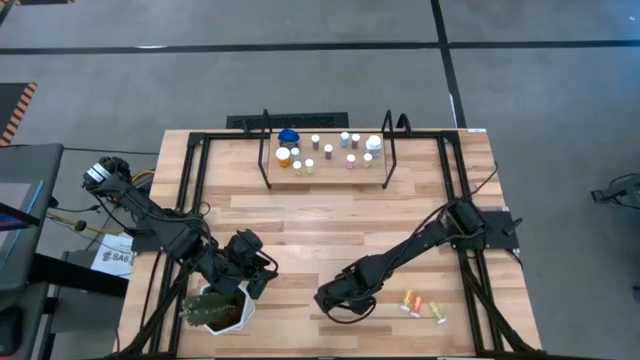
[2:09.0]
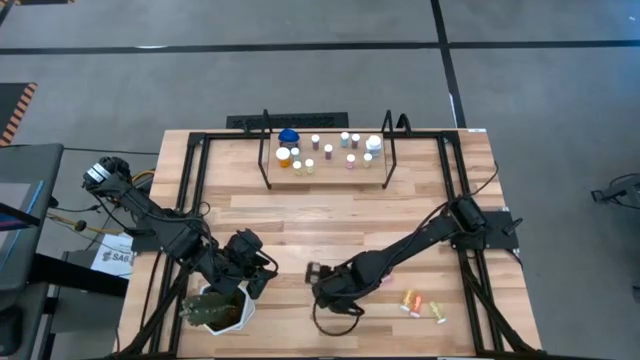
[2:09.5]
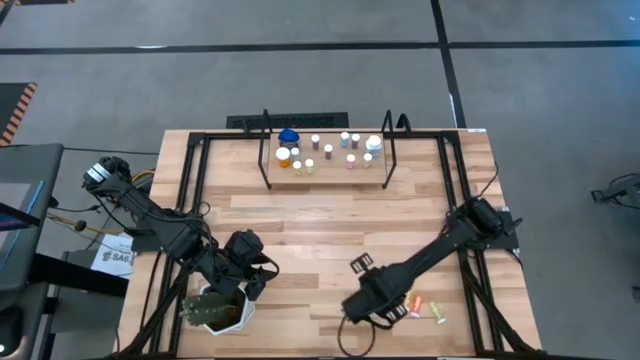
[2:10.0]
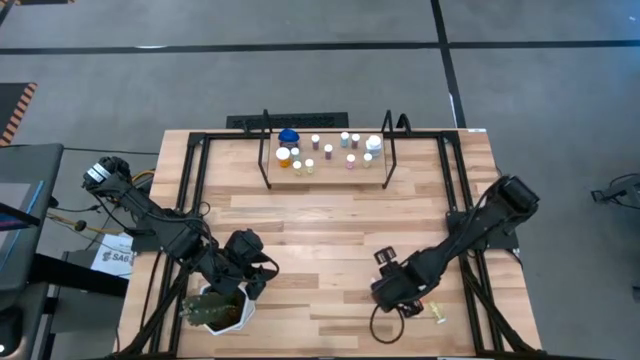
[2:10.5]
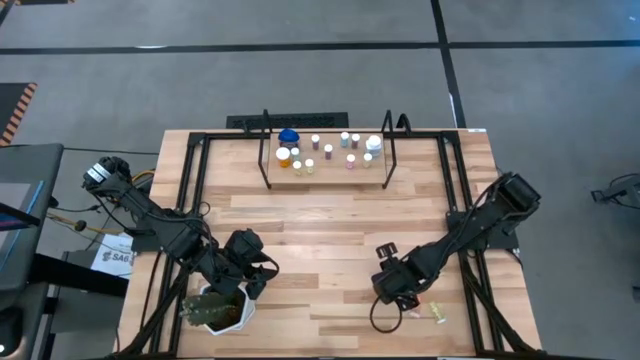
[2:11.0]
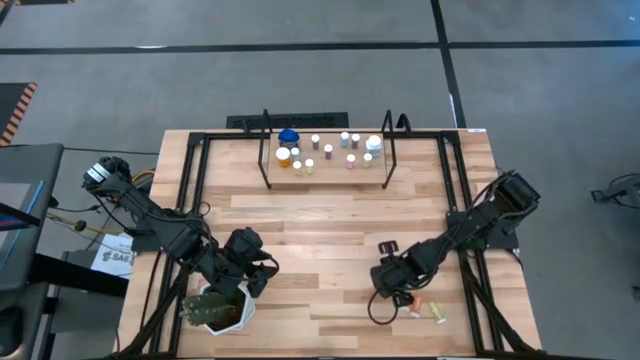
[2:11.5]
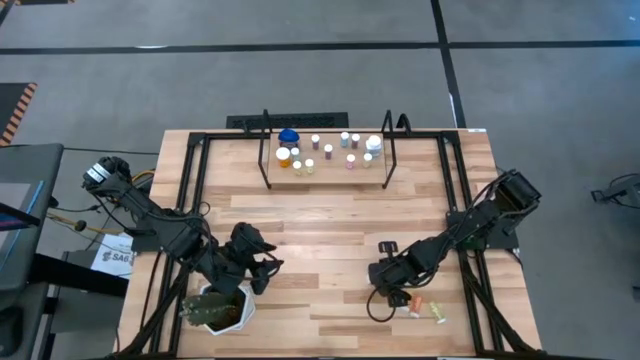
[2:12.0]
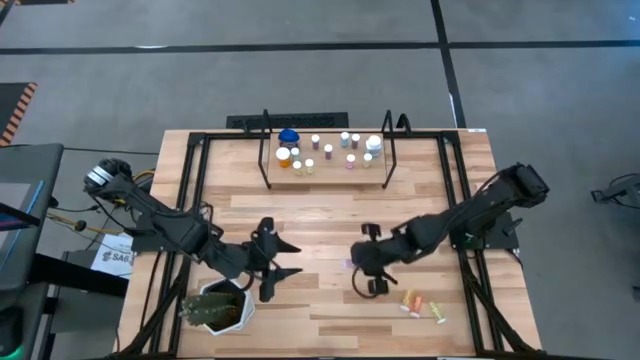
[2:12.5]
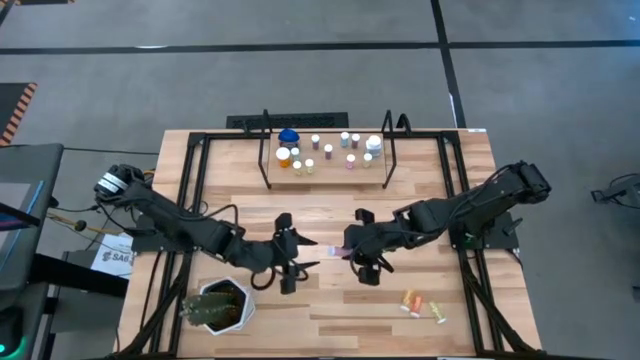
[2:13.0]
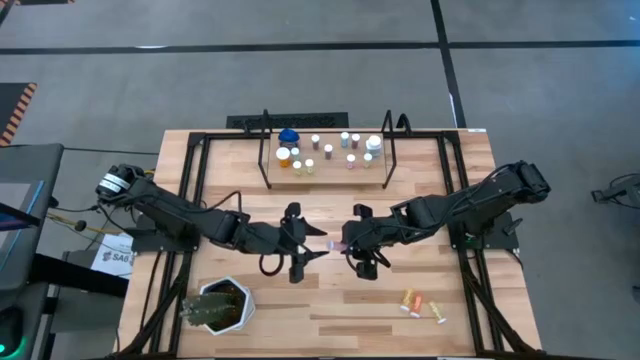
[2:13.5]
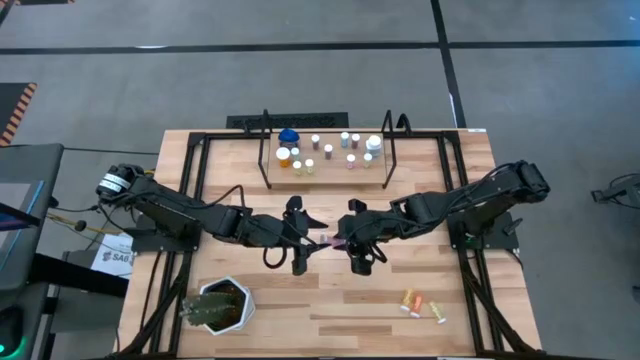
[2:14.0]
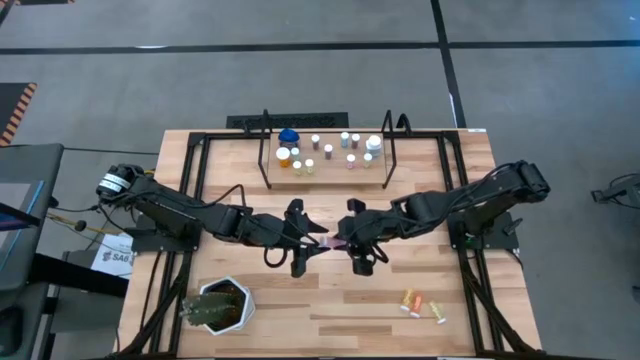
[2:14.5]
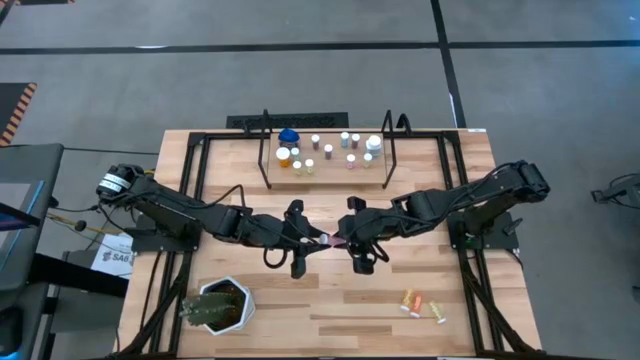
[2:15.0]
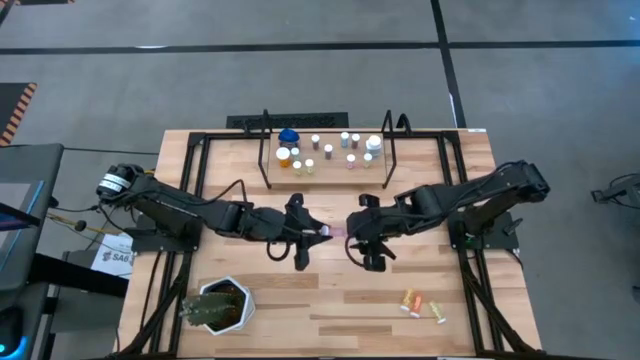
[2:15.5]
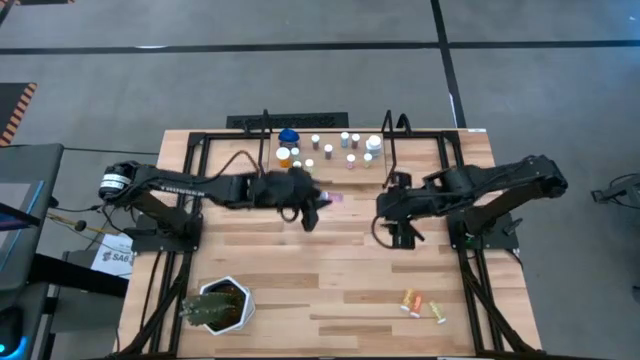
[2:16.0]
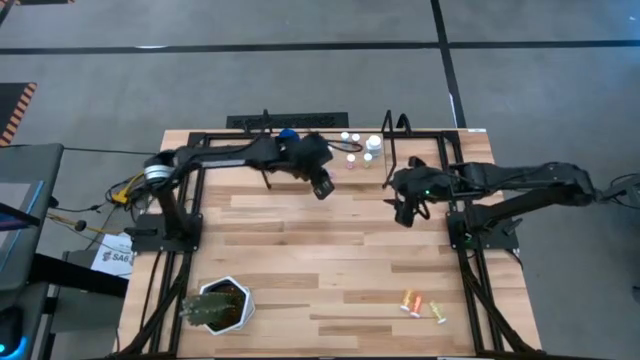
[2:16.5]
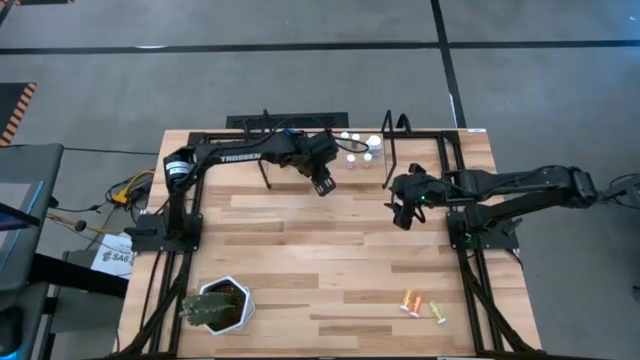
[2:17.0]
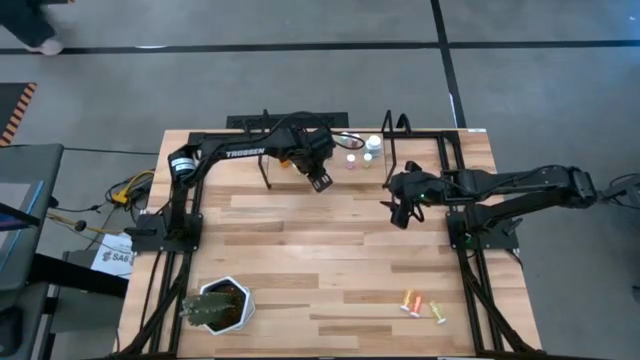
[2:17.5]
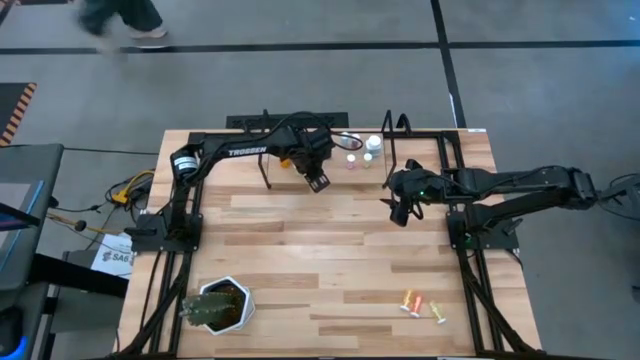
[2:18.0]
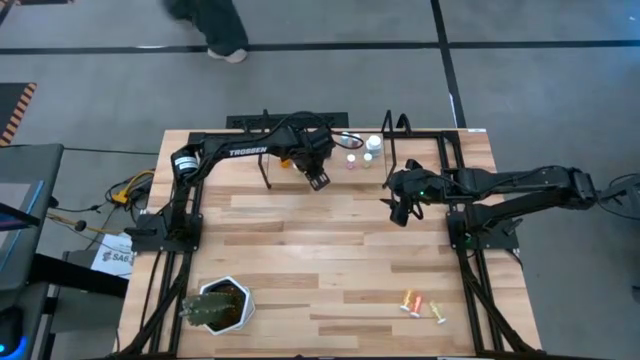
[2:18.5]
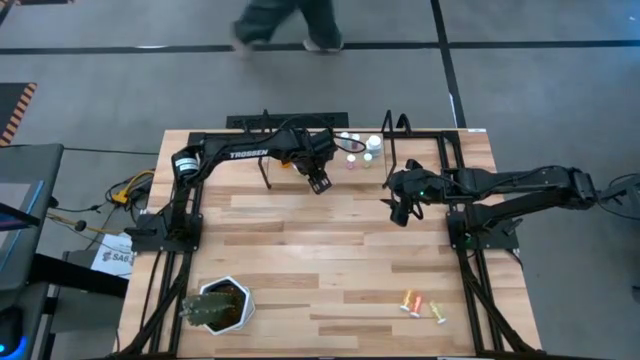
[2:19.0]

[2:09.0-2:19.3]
Task: Pick and place medicine bottles onto shelf by color
Put the pink pill bottle on the shelf

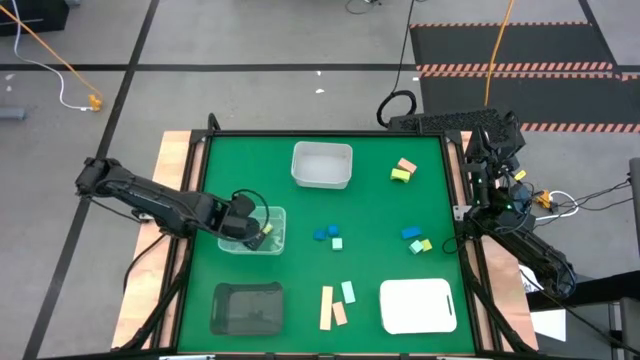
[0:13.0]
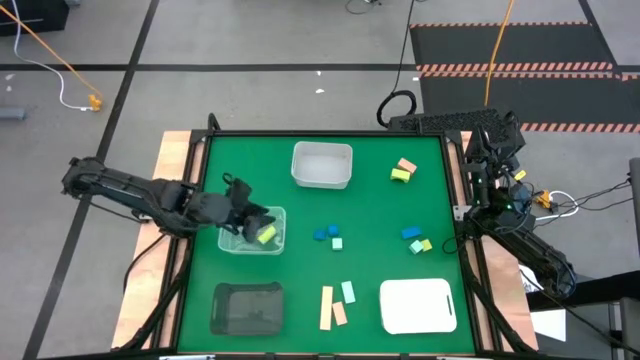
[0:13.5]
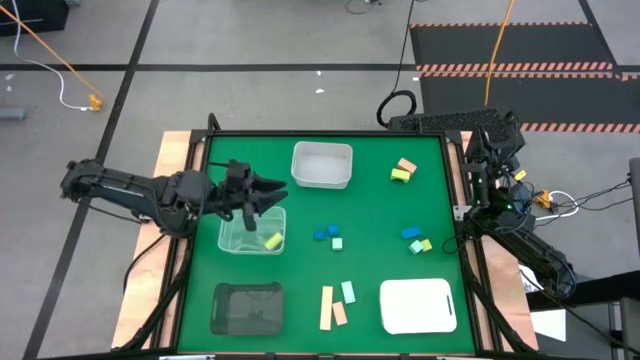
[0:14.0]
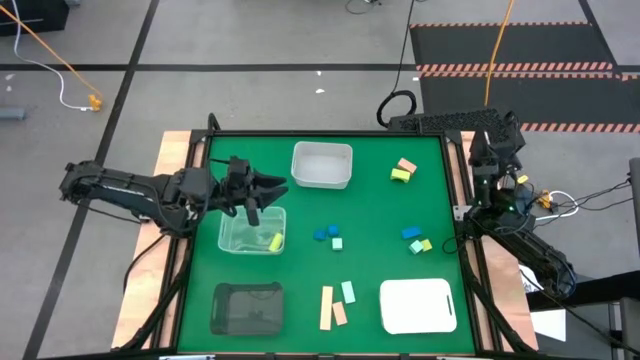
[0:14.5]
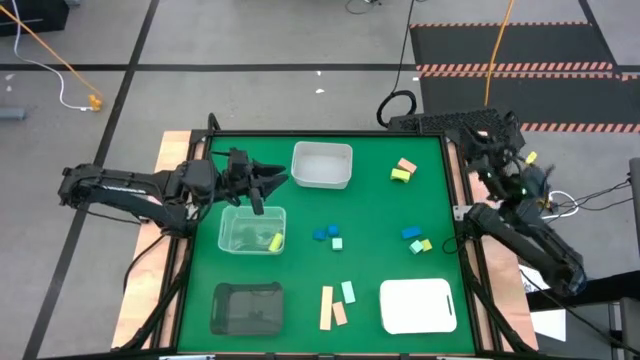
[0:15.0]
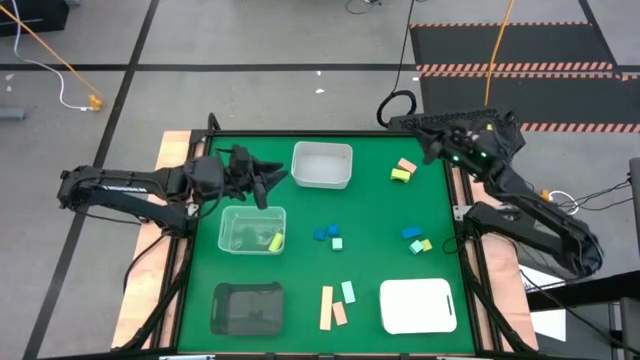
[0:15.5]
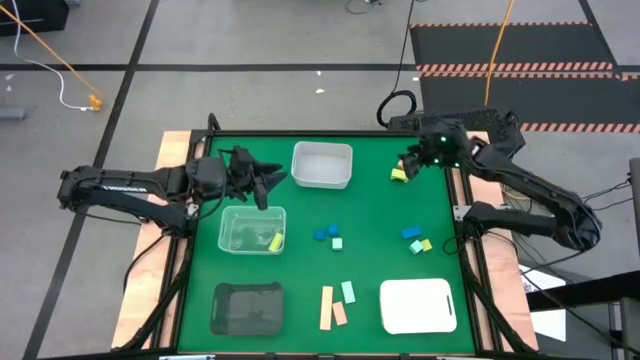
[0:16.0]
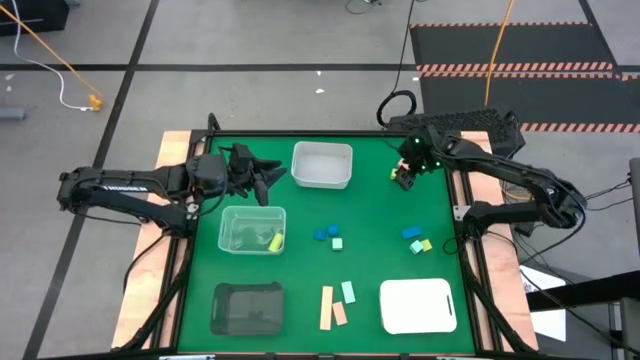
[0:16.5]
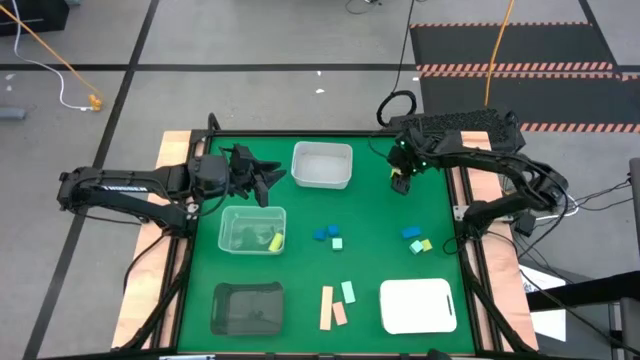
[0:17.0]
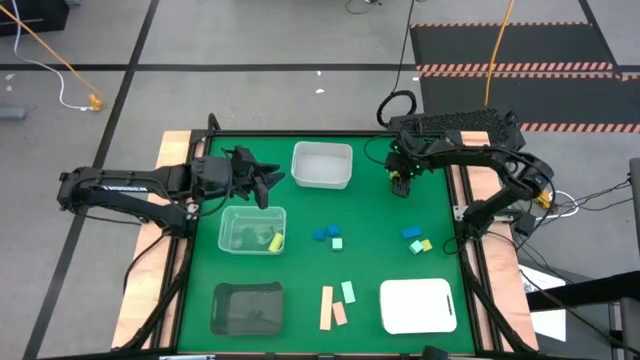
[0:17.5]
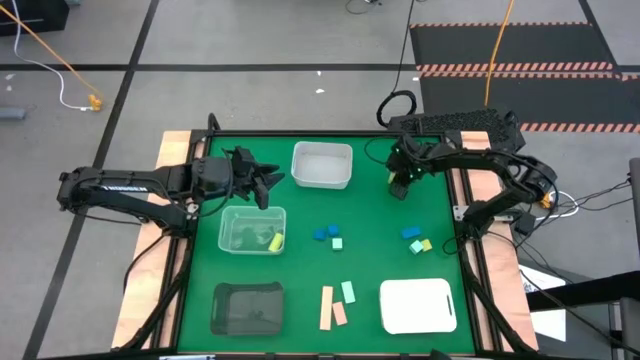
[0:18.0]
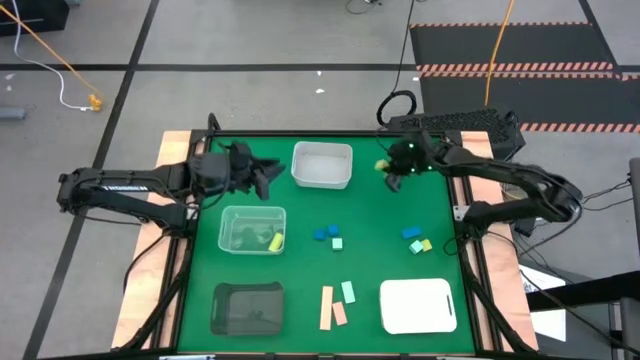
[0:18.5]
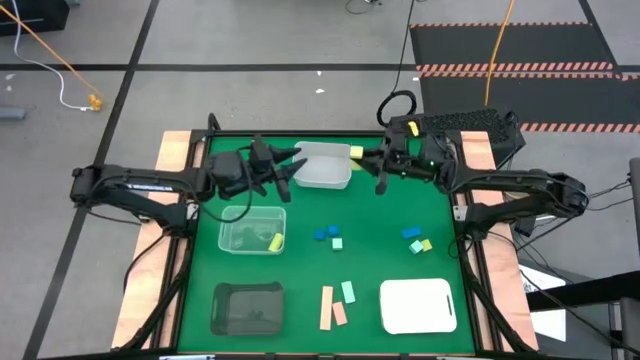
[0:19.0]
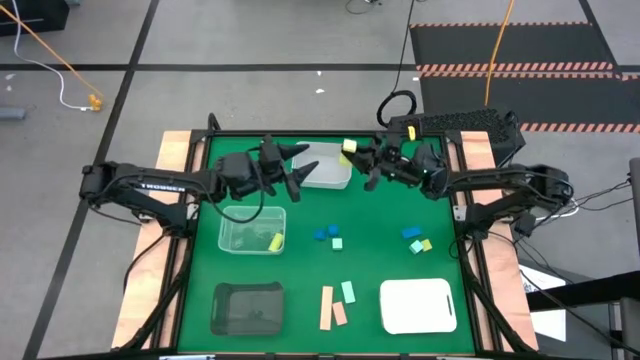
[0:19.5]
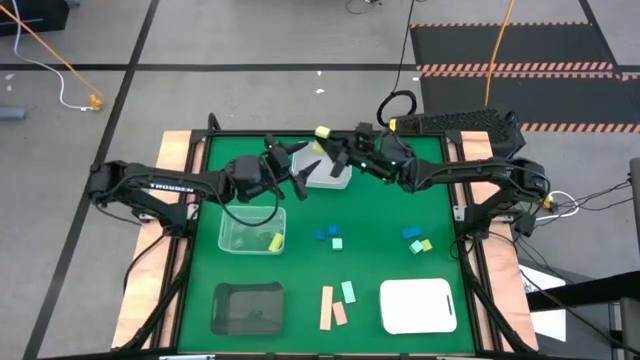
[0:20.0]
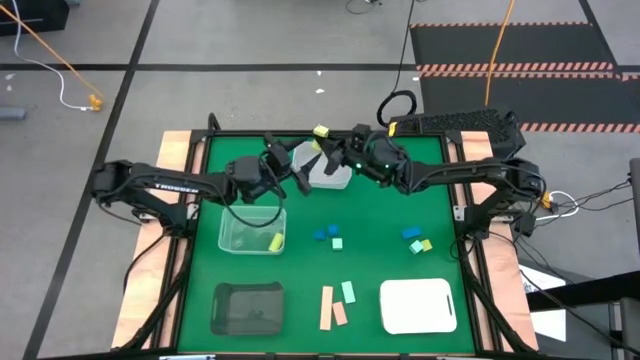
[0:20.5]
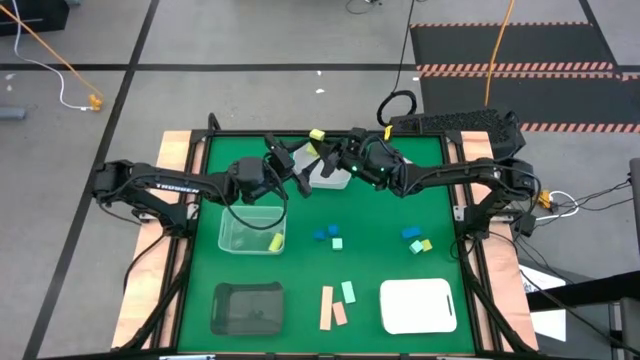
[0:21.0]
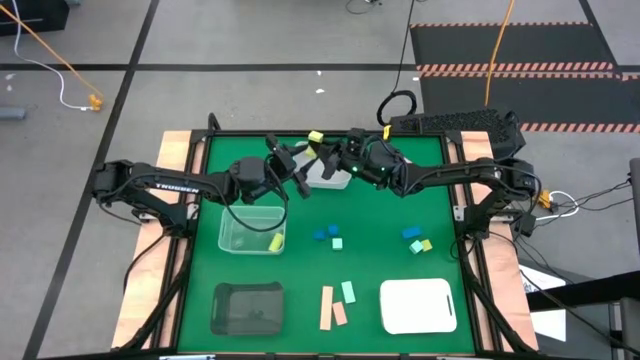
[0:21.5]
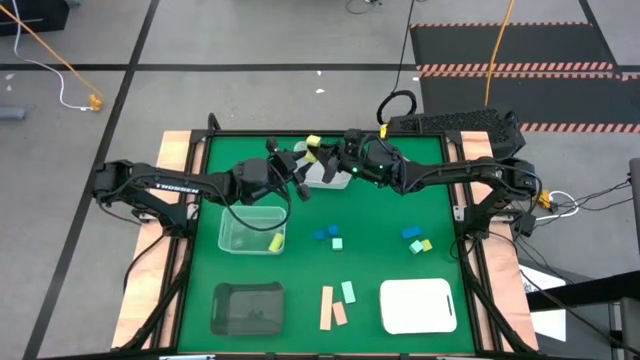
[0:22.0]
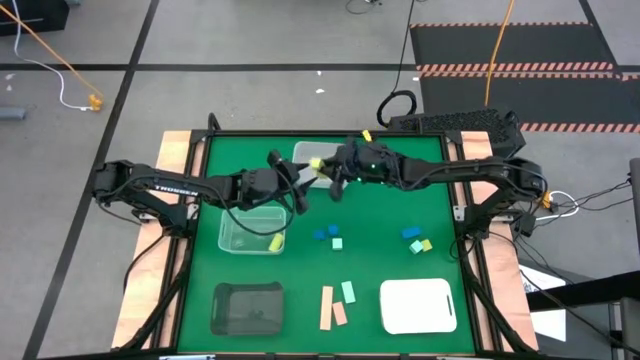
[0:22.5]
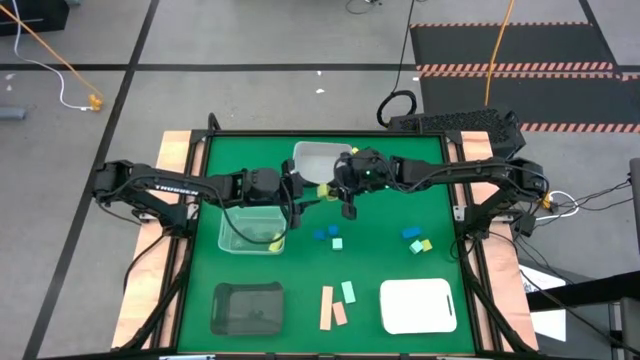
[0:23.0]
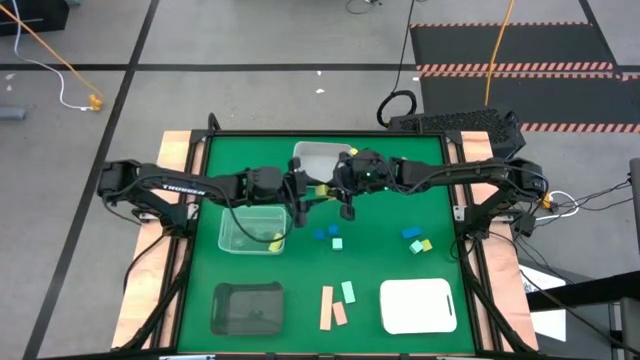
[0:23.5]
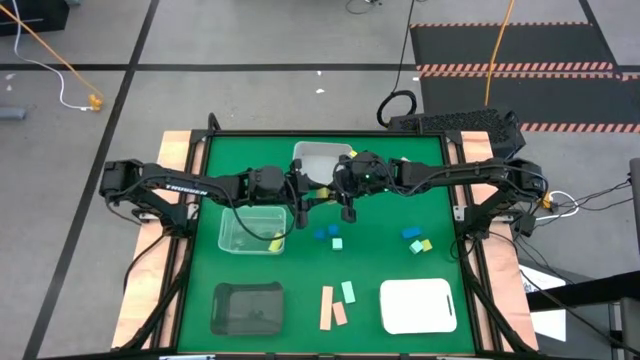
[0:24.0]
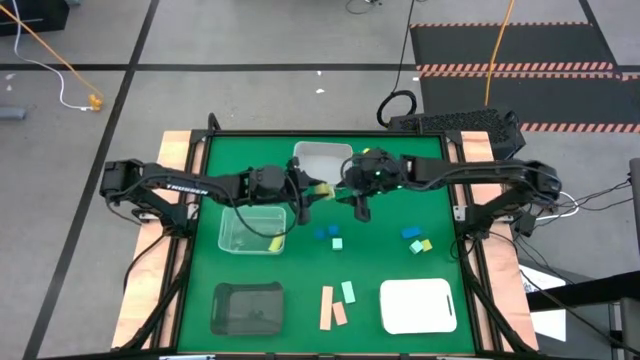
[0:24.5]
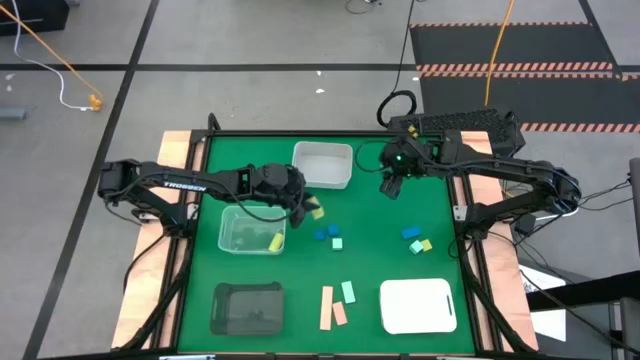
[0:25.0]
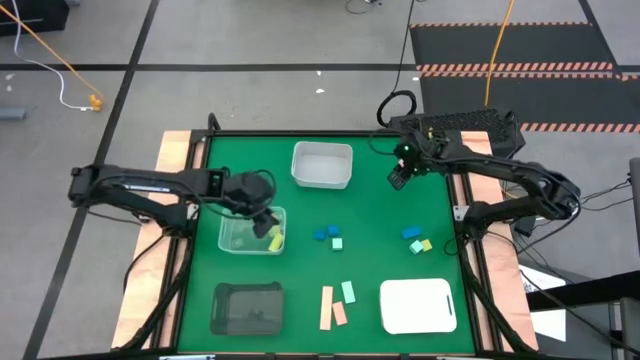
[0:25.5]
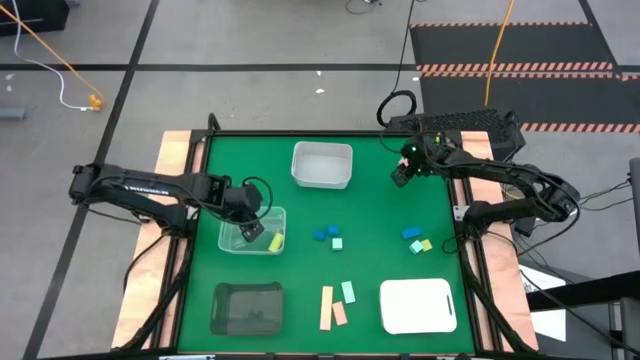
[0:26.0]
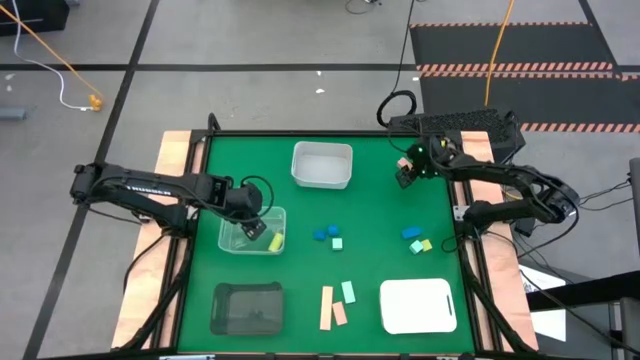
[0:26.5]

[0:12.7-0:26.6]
Task: Sort & place blocks by color
Put the top yellow bridge block into the transparent bin
